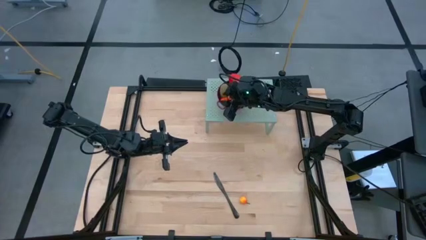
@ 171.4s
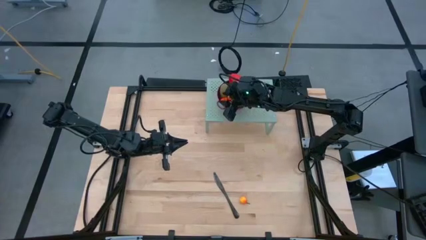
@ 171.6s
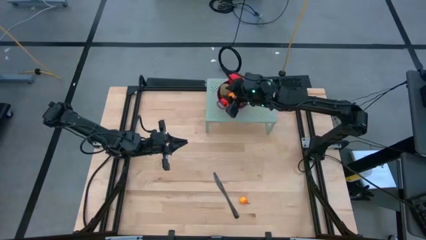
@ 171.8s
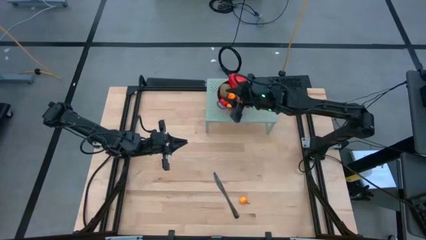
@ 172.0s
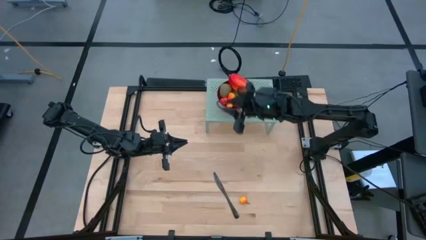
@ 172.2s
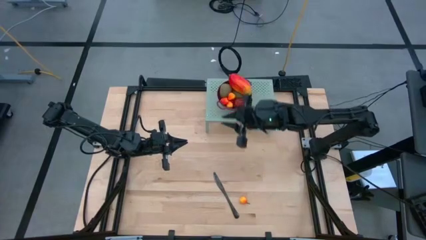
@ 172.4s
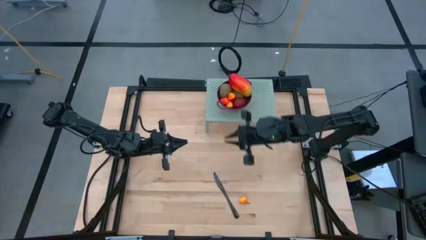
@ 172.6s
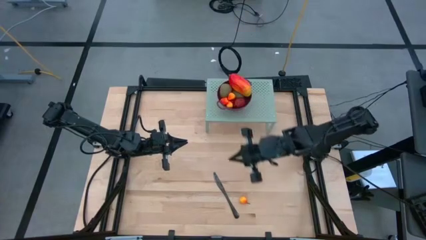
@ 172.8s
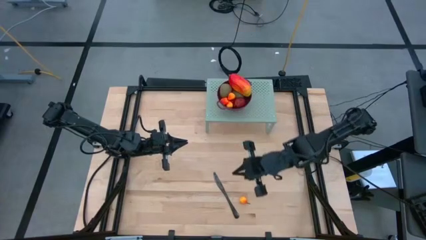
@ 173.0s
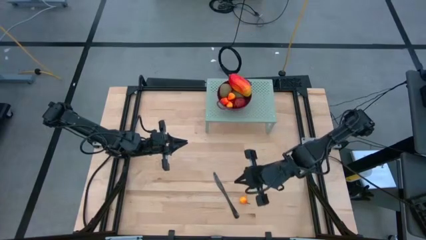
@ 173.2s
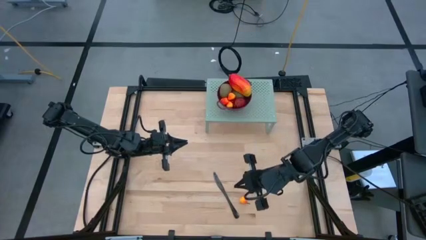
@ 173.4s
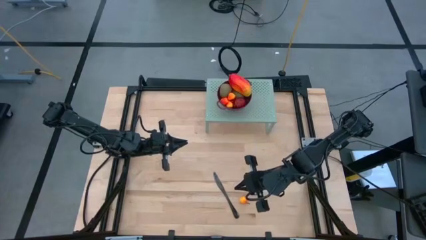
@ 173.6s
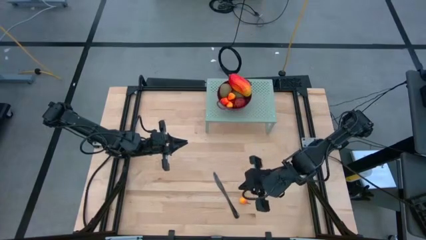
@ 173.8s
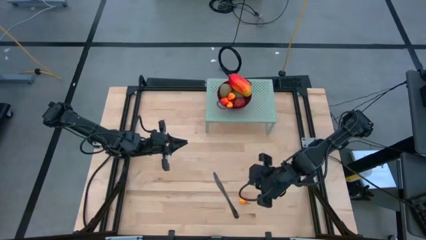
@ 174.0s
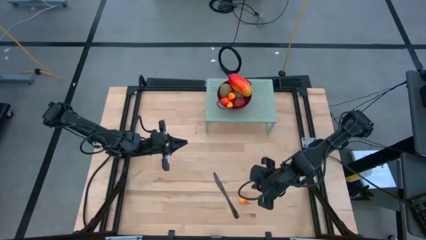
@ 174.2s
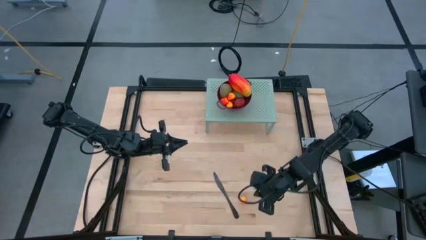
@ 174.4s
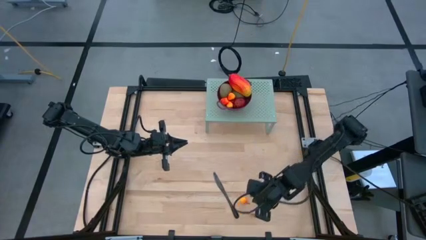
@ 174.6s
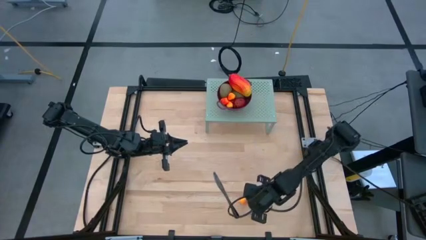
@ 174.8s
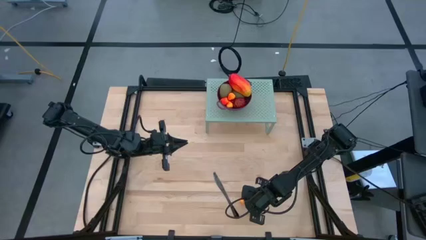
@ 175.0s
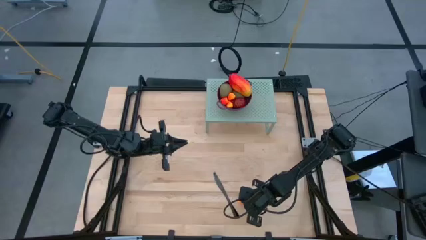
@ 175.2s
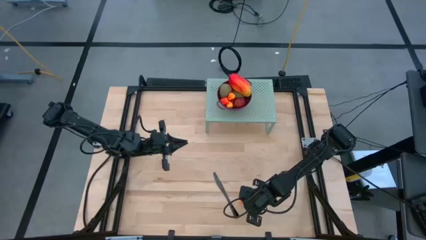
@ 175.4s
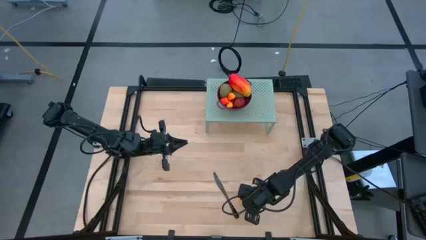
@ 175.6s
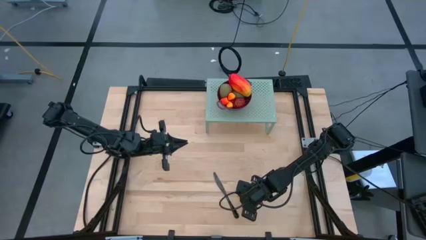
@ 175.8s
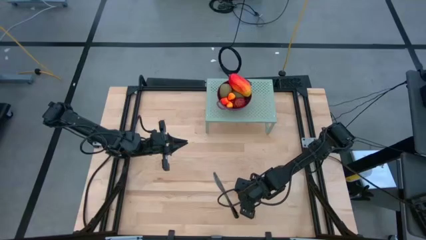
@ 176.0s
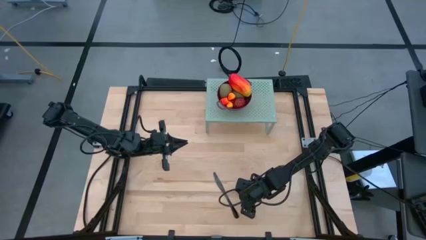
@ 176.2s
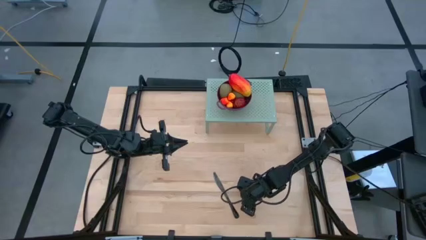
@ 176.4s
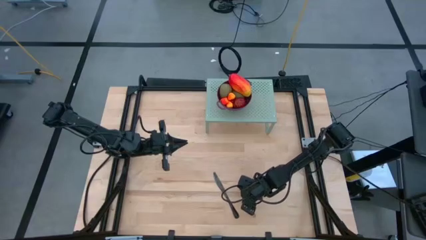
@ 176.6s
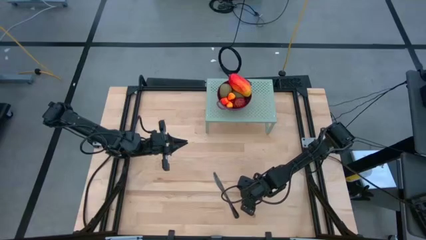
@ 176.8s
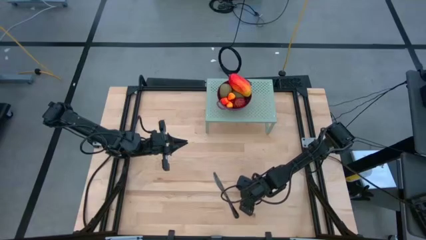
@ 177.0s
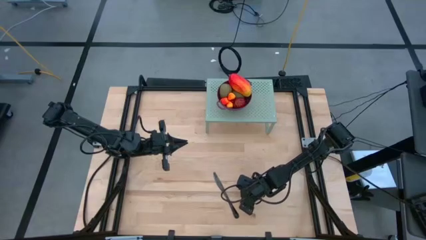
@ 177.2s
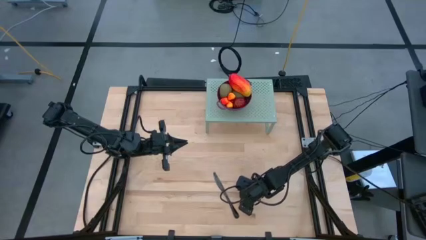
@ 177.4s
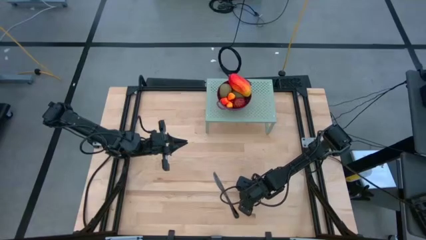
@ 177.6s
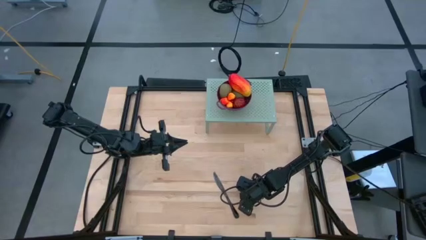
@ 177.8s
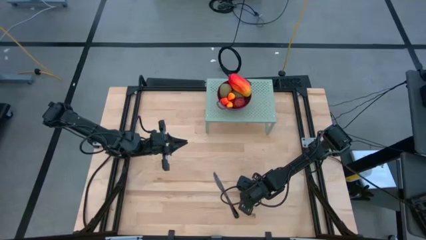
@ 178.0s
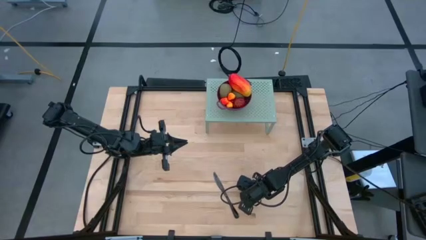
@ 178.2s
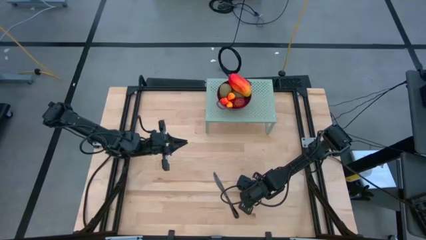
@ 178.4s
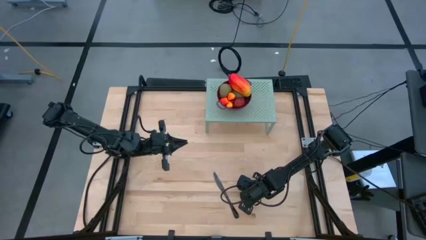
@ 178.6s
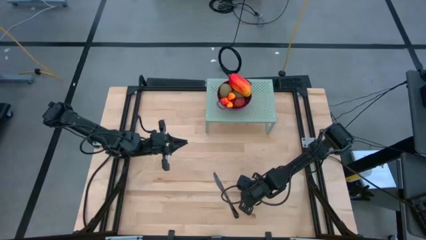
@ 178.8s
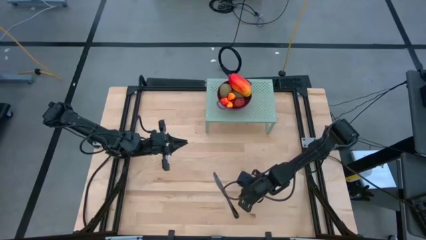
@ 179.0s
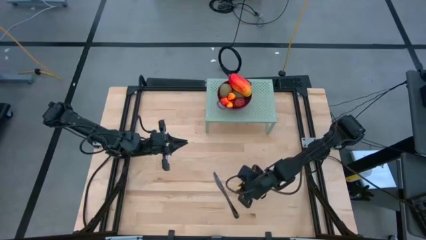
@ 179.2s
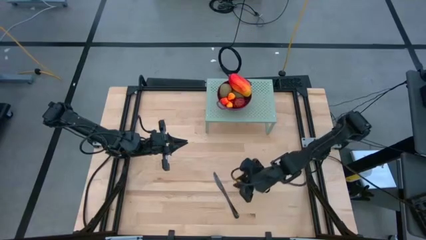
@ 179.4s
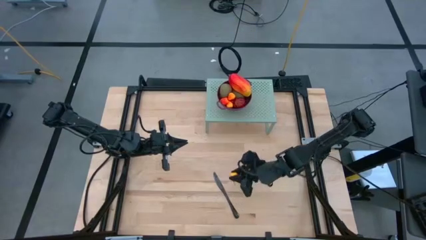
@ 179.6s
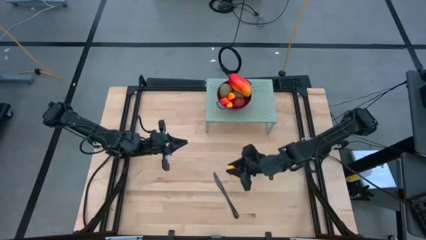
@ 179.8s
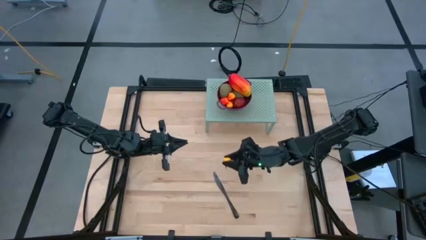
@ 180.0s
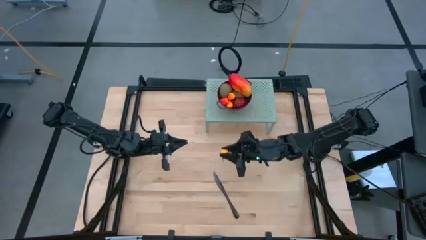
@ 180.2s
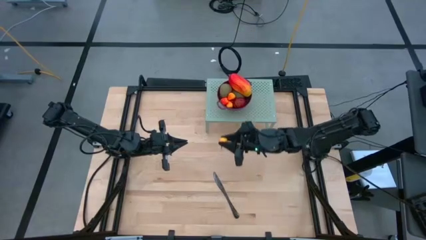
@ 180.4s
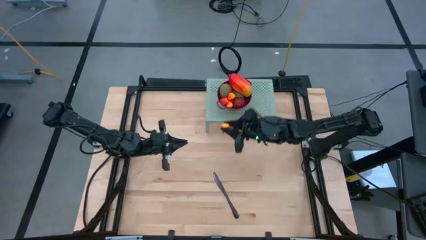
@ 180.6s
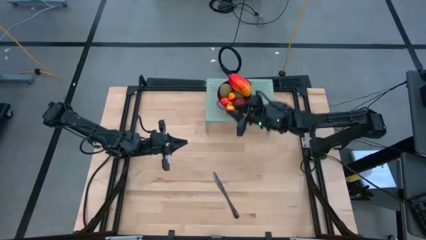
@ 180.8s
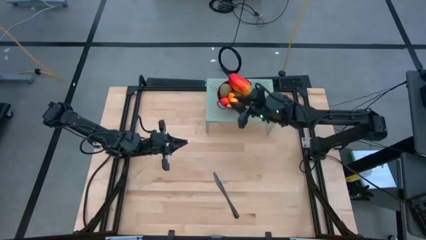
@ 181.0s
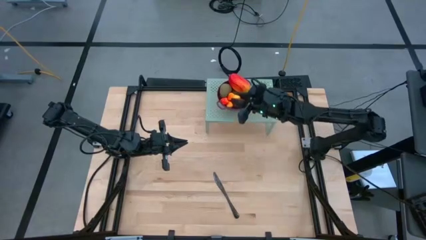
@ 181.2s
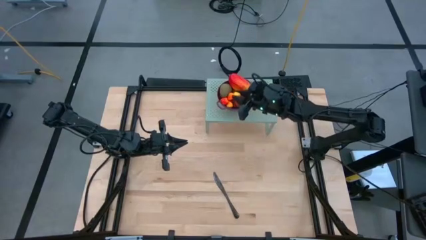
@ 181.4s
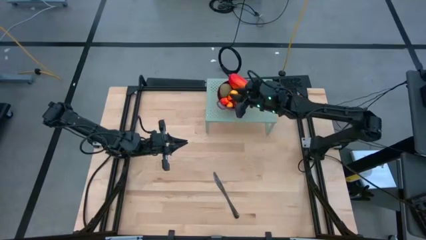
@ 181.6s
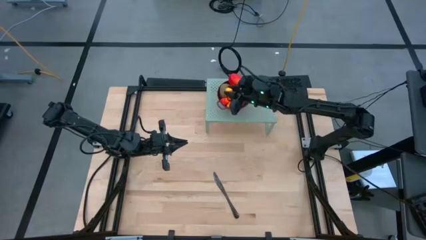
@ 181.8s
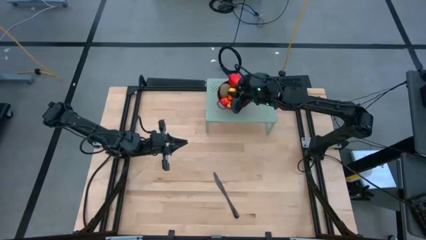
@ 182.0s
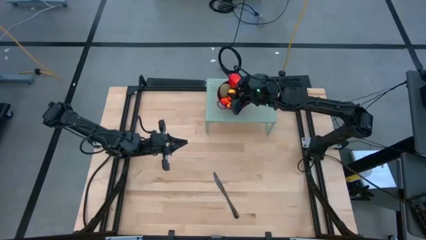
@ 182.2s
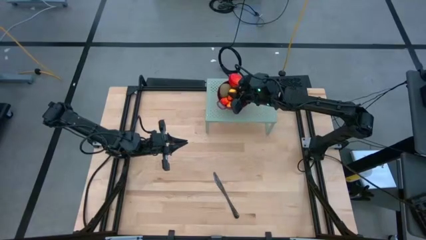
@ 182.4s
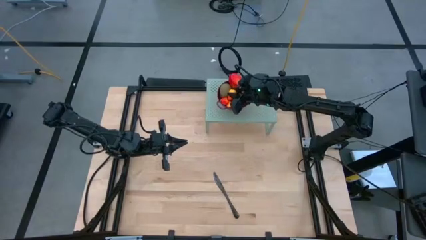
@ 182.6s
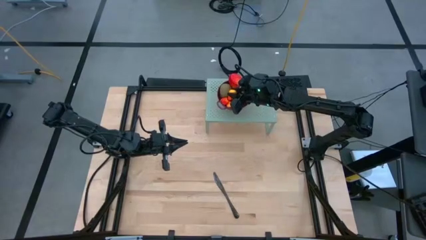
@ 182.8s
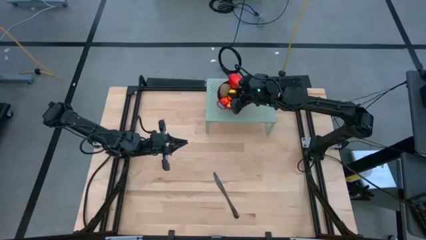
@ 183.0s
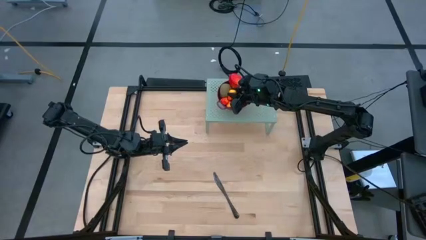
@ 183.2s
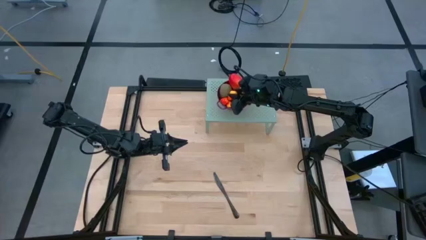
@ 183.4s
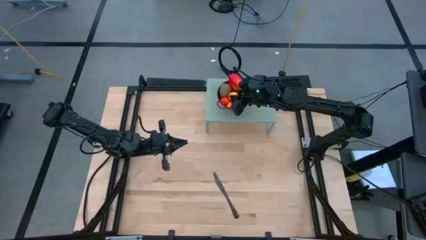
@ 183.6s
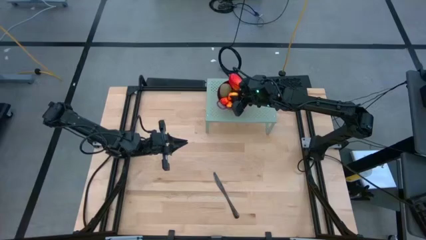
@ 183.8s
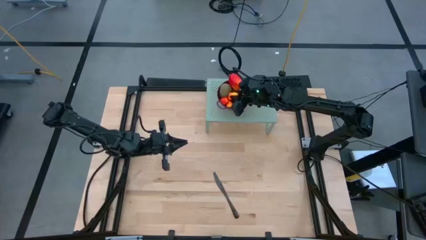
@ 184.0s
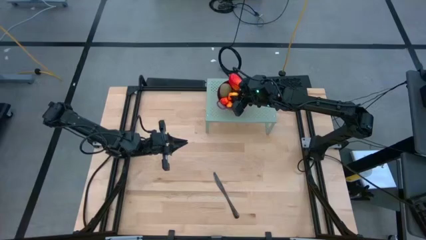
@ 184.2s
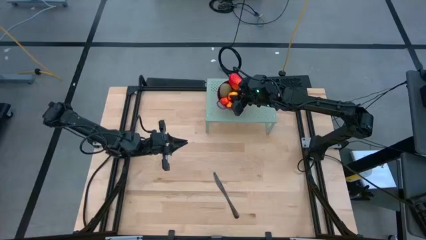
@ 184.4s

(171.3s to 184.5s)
Task: Pick & Place Fruit
Put the orange pear into the violet strainer bowl on the shelf

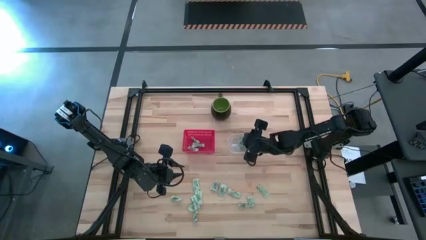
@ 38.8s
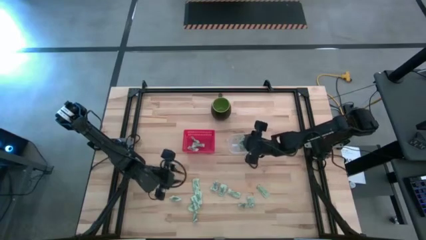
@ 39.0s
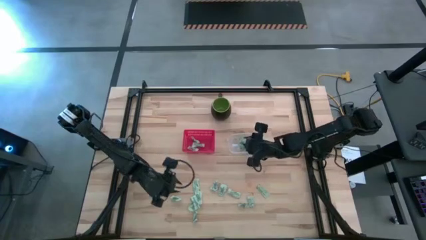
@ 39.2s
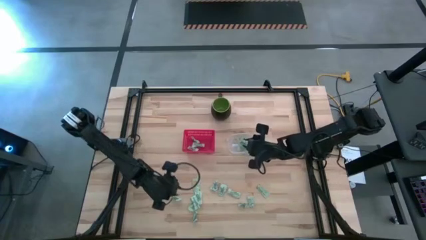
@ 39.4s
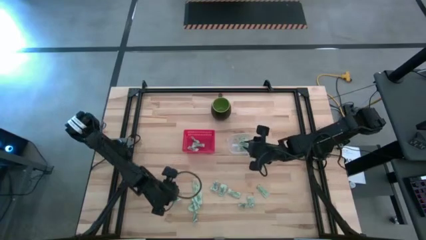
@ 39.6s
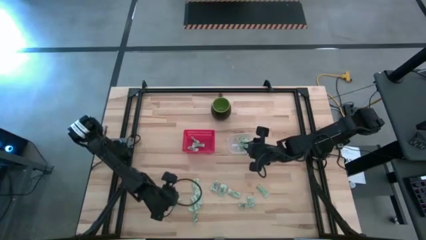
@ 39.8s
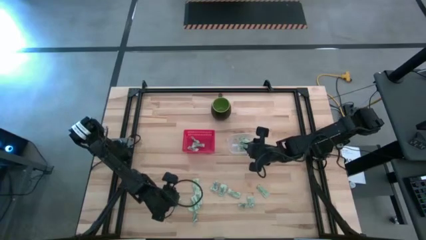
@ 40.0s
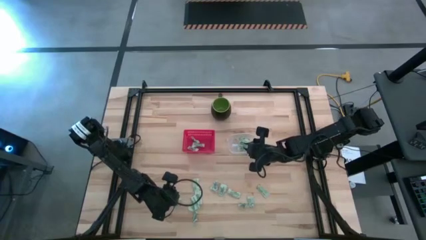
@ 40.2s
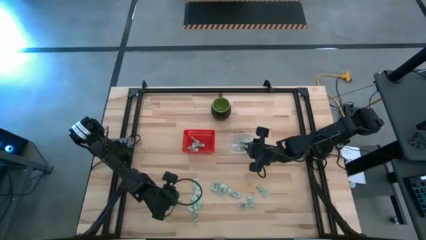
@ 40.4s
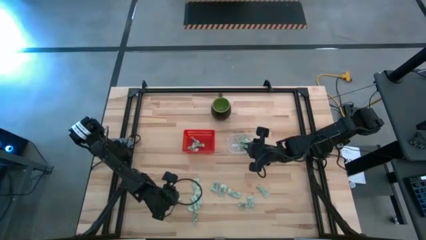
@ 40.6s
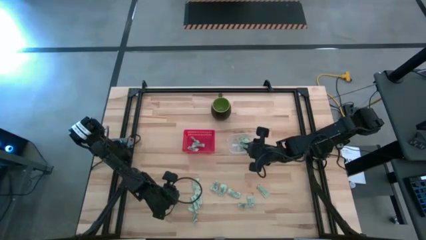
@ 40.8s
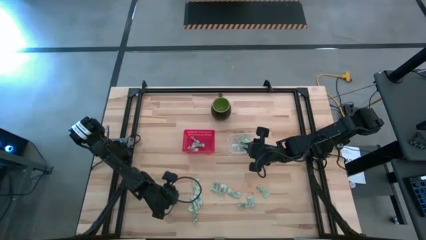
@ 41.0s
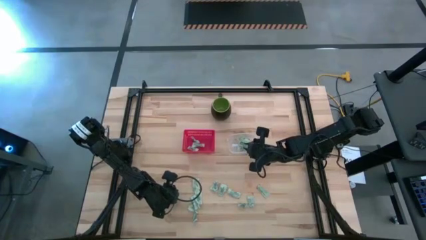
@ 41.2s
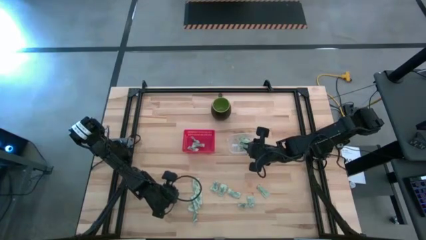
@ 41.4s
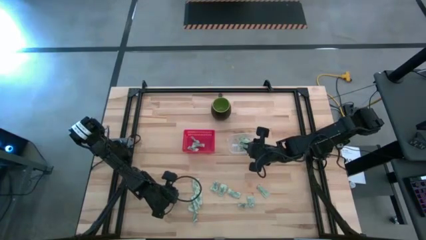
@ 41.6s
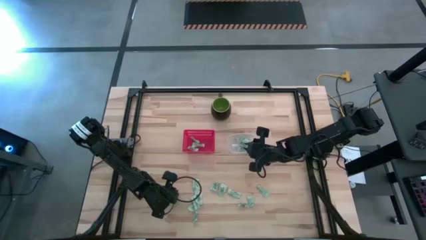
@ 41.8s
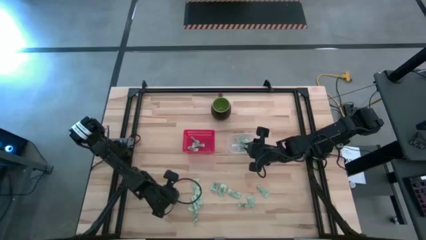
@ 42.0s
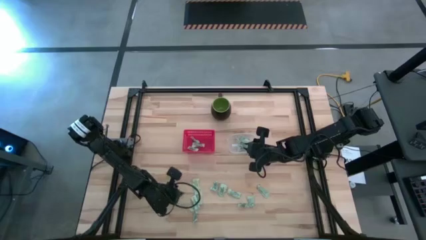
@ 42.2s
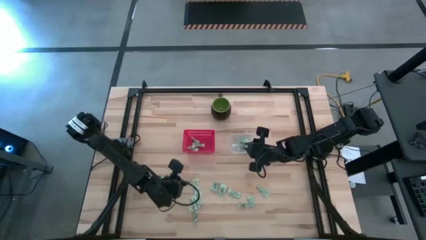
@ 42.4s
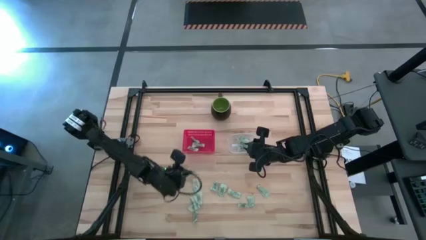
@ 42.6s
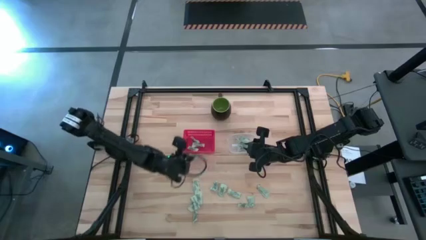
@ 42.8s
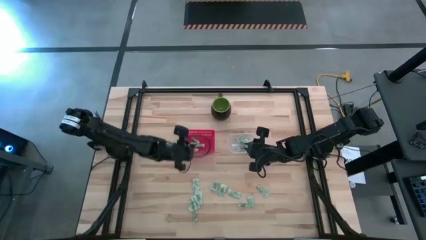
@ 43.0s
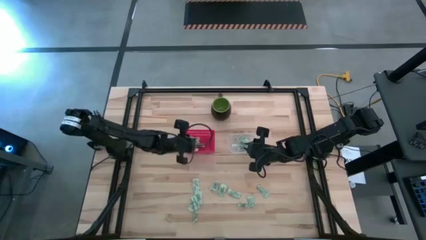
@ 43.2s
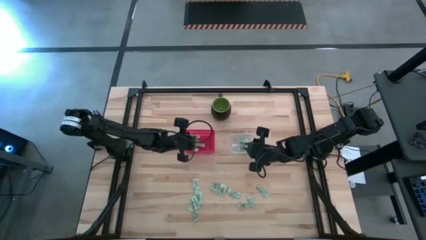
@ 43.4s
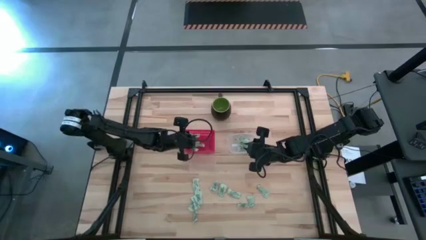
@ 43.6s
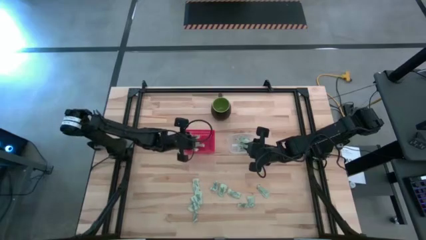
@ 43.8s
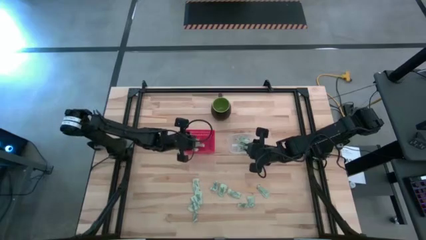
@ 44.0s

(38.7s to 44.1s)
Task: Pick and place items into bin
Put the stevia packet into the red bin
